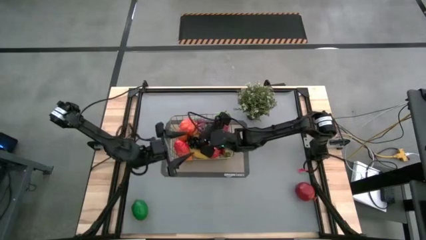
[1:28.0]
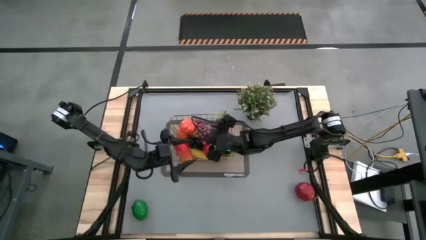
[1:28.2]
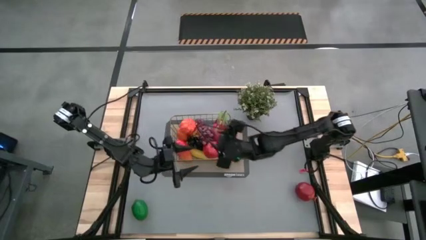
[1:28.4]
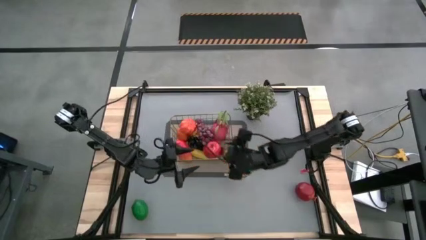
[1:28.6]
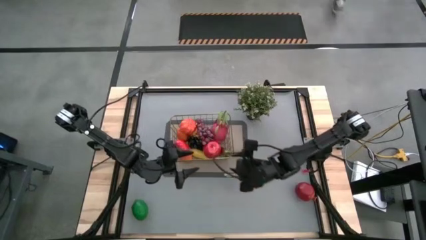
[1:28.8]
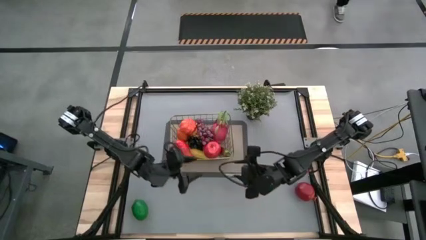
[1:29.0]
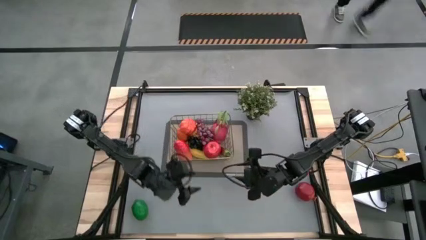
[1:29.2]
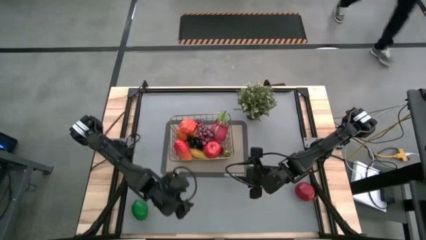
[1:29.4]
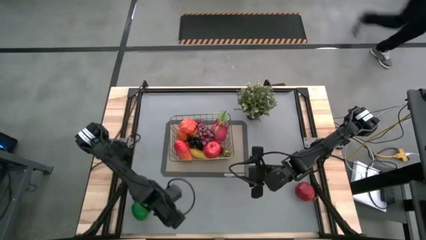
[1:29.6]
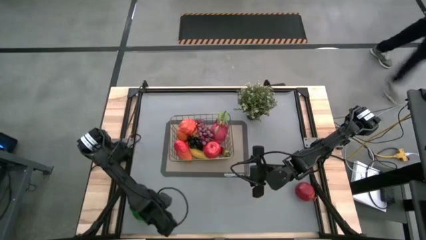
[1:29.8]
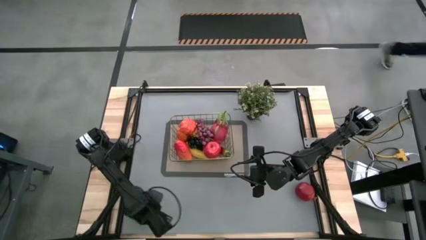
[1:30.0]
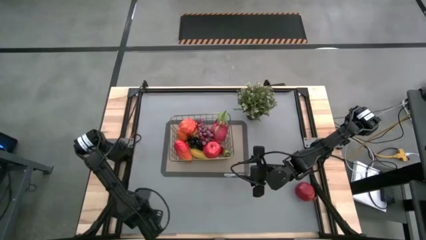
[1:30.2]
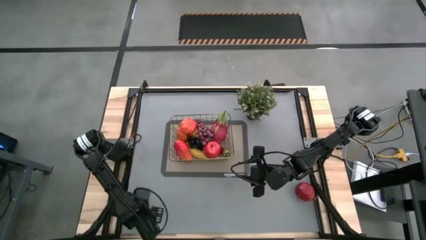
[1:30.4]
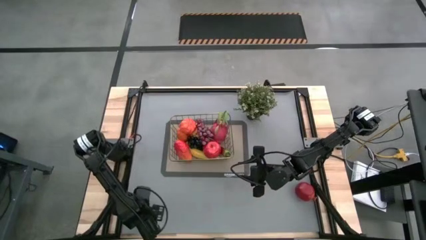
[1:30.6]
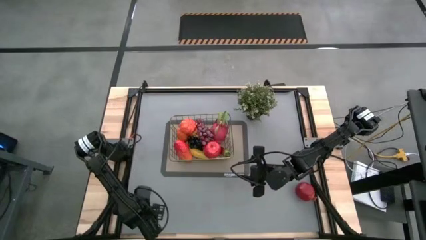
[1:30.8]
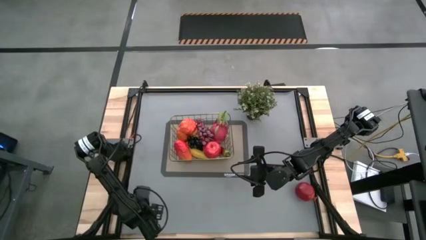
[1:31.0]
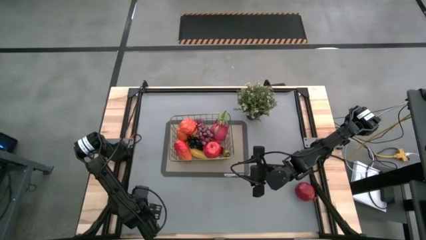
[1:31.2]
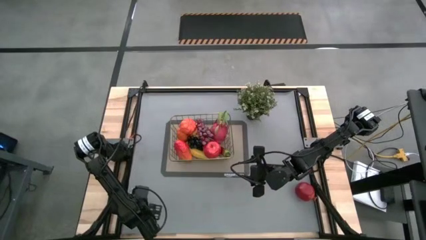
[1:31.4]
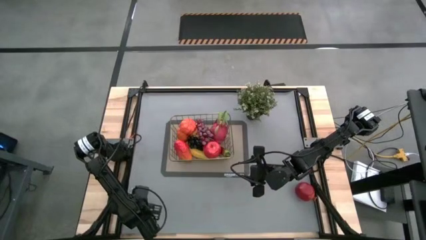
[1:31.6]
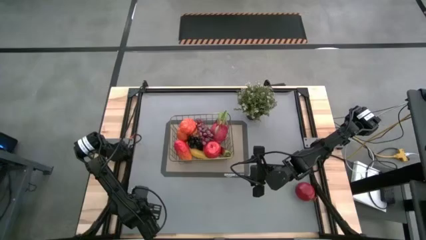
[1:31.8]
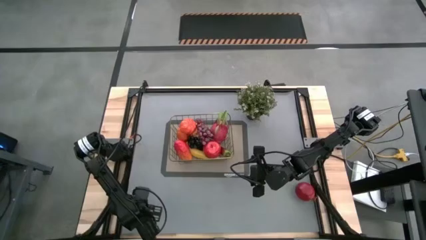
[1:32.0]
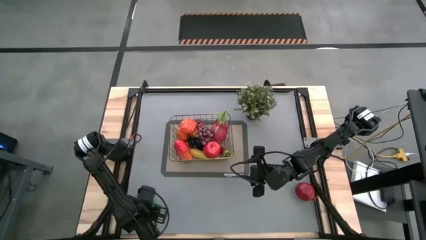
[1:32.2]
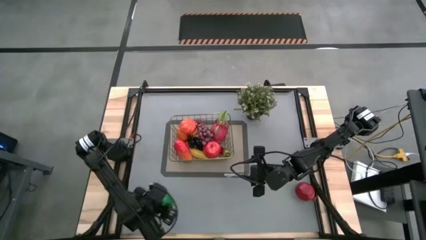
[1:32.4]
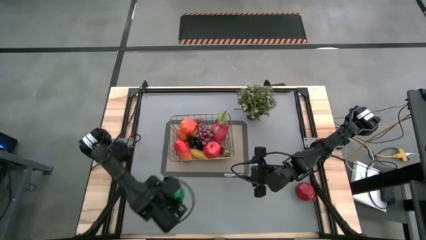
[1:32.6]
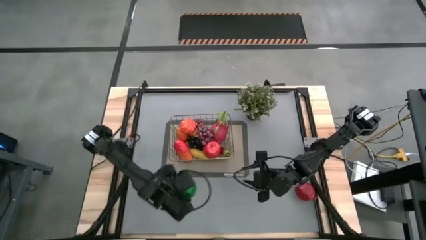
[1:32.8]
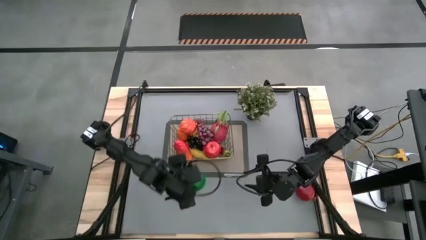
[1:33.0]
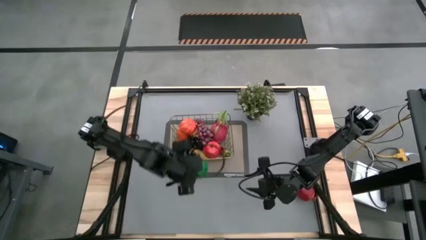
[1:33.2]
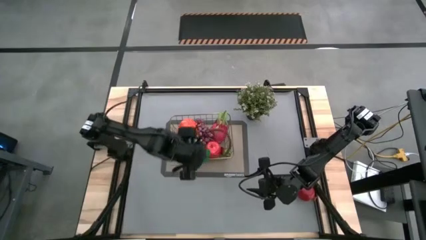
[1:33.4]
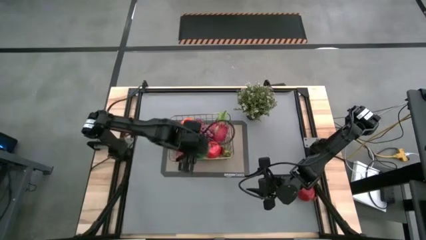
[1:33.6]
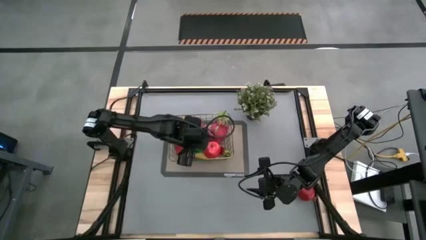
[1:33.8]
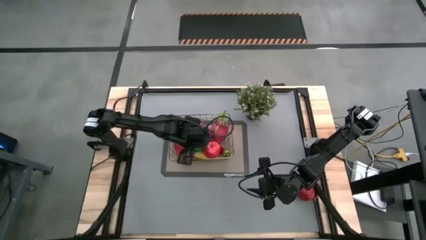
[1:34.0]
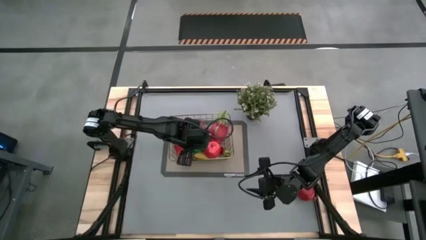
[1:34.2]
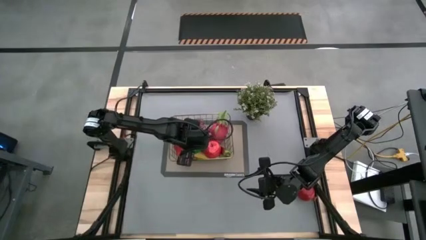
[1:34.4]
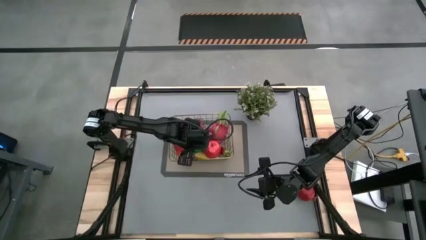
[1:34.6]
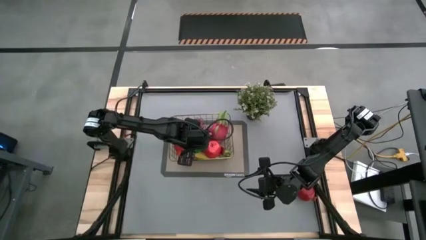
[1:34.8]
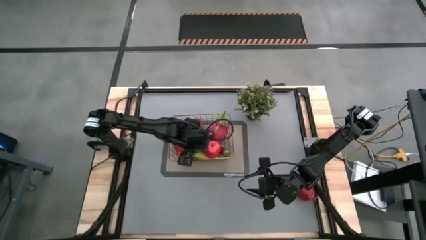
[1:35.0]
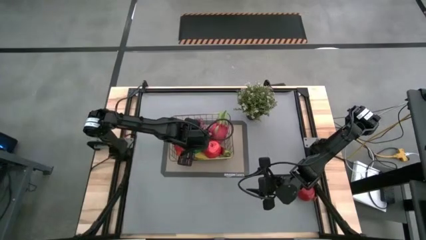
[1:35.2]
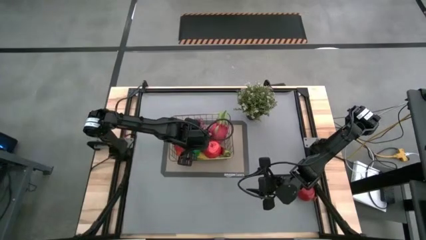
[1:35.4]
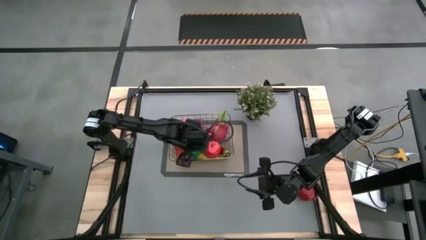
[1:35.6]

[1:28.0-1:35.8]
Task: Build produce basket
Put the lime into the wire basket

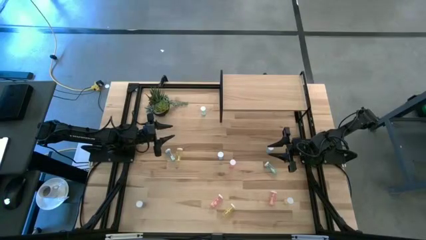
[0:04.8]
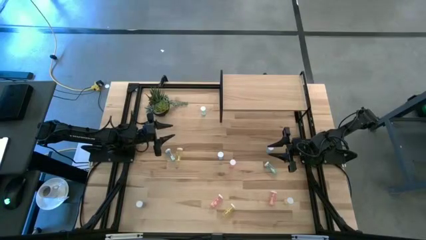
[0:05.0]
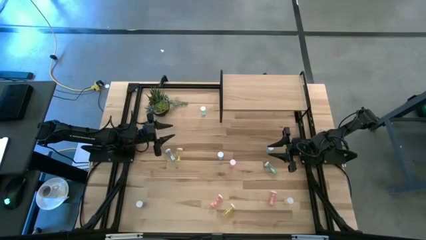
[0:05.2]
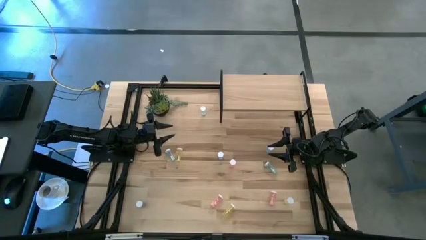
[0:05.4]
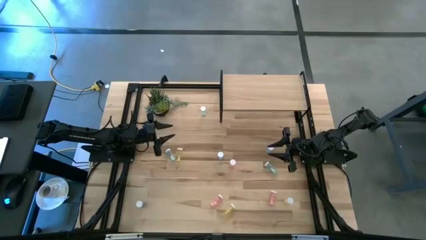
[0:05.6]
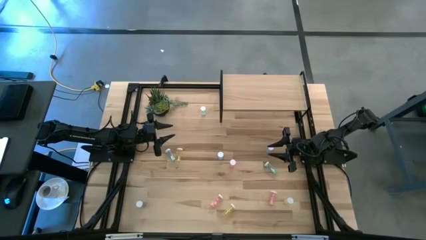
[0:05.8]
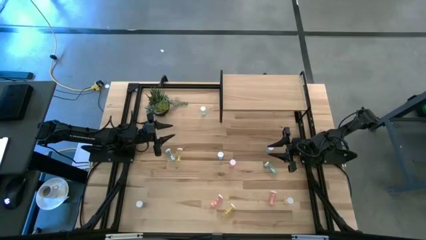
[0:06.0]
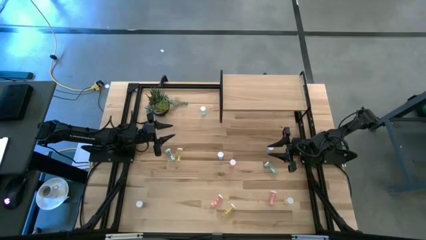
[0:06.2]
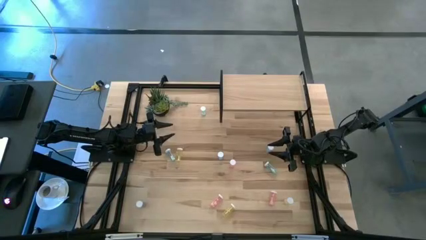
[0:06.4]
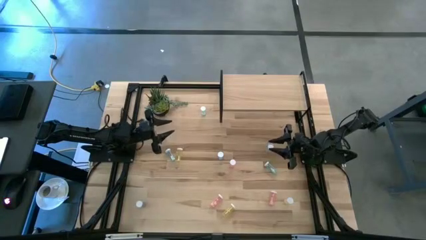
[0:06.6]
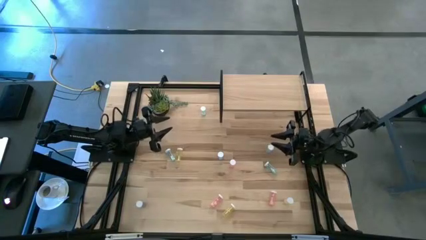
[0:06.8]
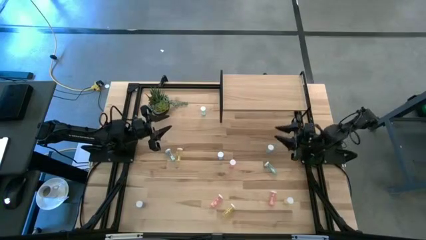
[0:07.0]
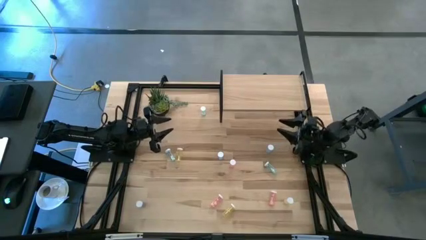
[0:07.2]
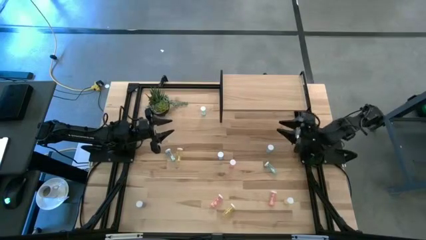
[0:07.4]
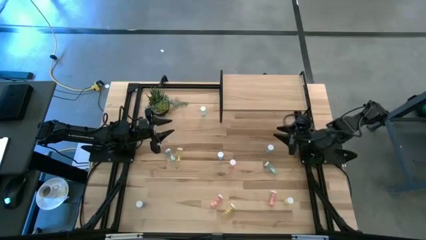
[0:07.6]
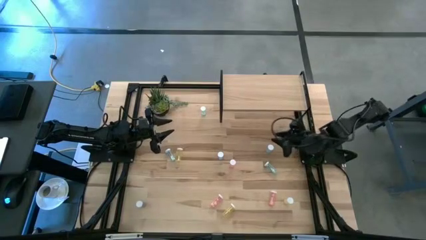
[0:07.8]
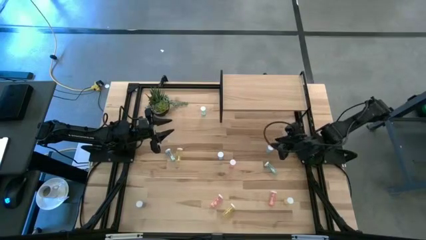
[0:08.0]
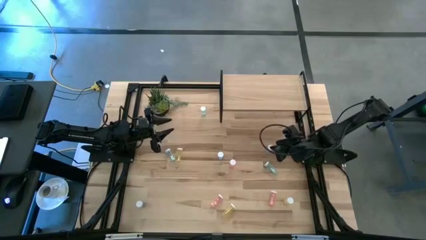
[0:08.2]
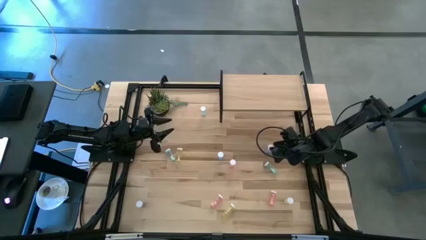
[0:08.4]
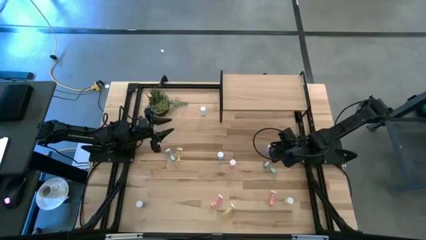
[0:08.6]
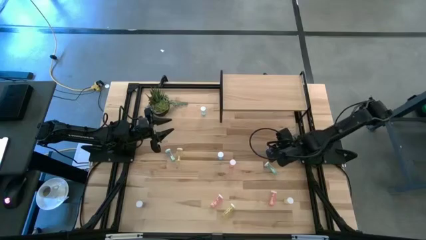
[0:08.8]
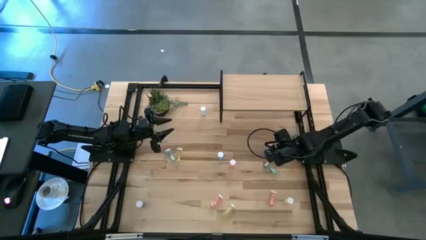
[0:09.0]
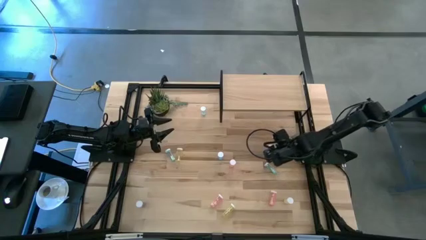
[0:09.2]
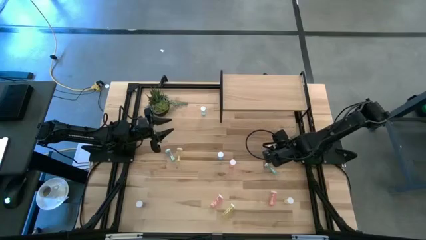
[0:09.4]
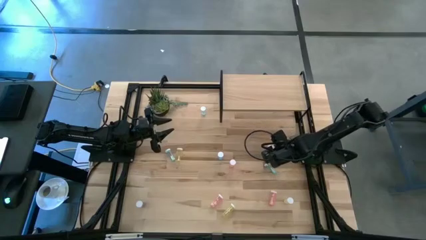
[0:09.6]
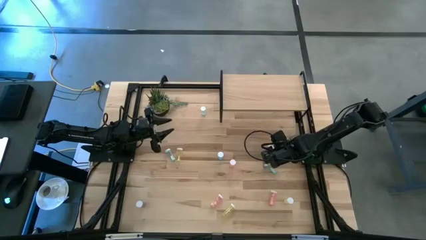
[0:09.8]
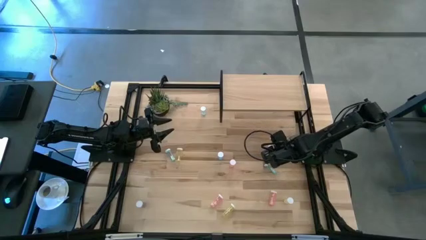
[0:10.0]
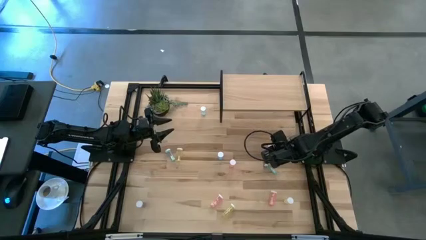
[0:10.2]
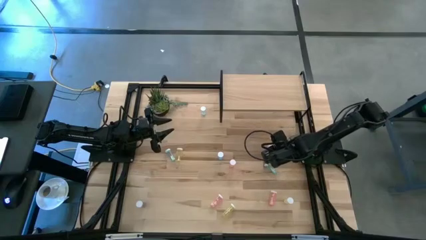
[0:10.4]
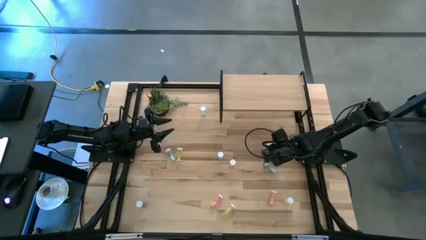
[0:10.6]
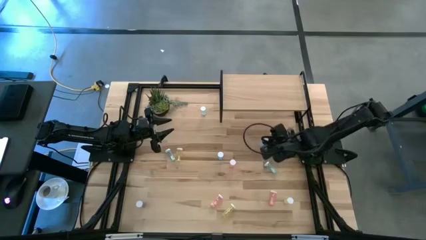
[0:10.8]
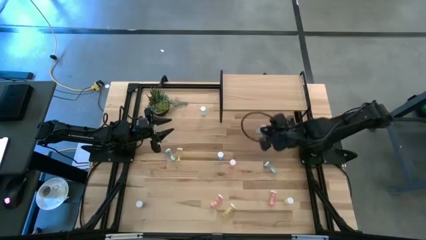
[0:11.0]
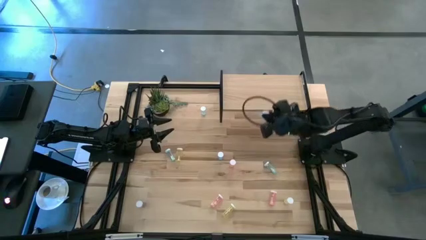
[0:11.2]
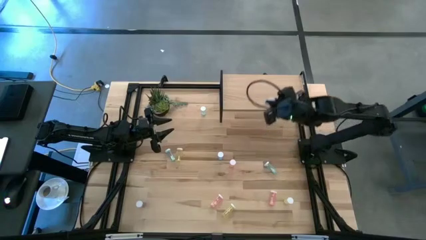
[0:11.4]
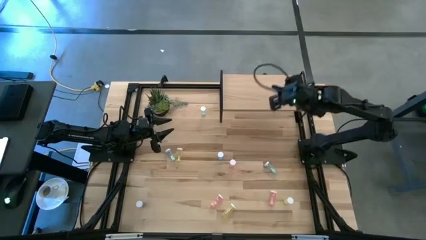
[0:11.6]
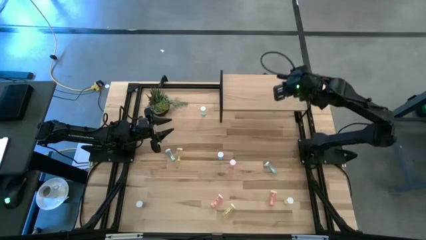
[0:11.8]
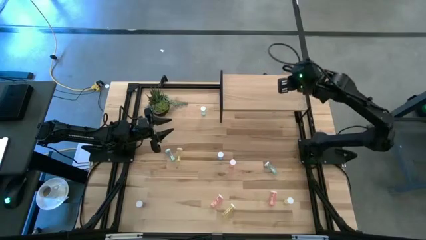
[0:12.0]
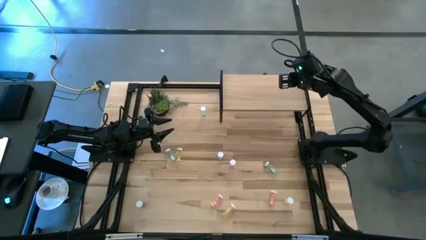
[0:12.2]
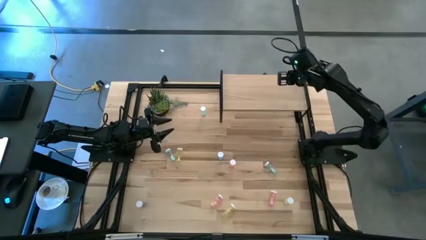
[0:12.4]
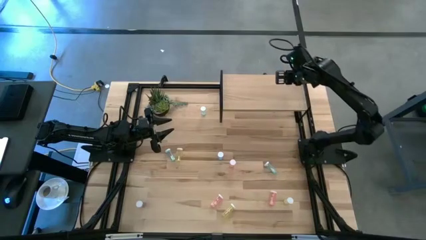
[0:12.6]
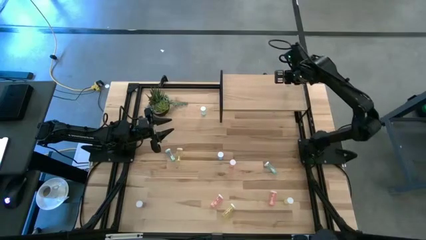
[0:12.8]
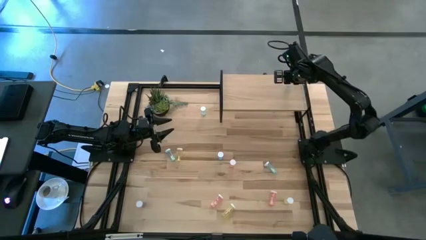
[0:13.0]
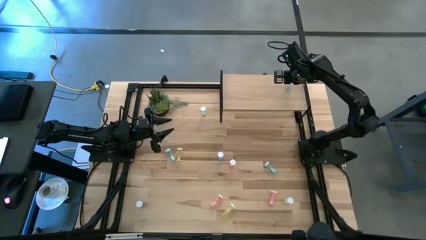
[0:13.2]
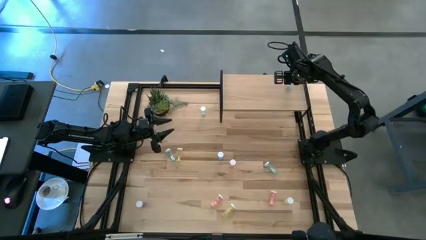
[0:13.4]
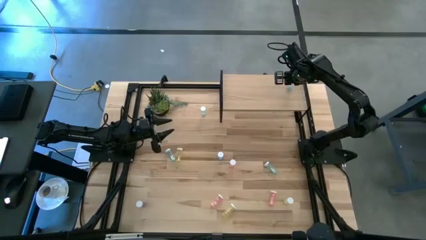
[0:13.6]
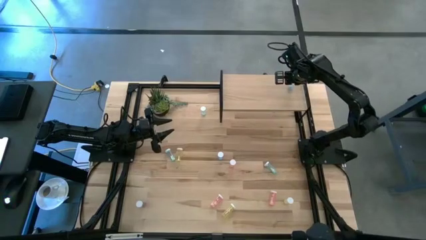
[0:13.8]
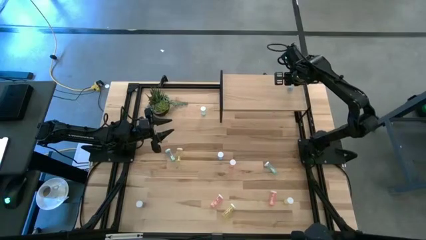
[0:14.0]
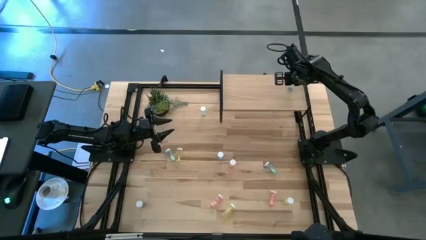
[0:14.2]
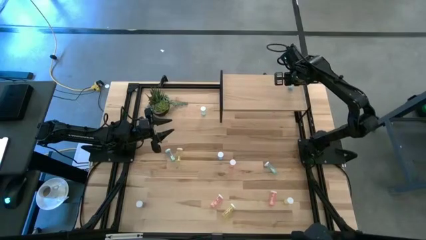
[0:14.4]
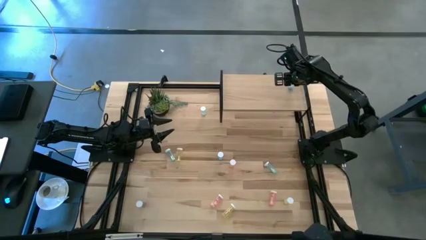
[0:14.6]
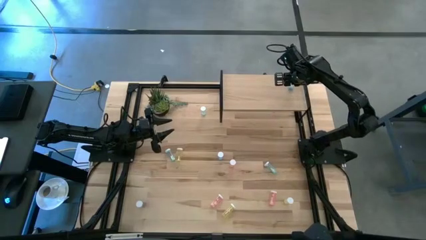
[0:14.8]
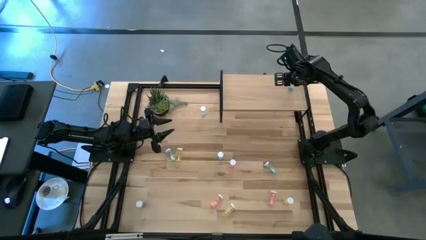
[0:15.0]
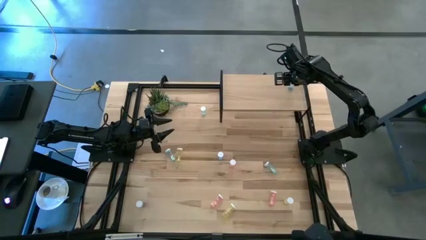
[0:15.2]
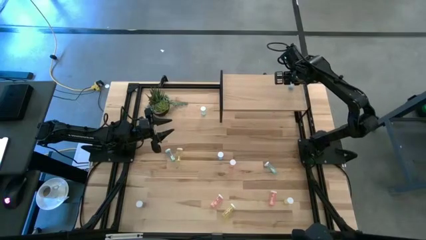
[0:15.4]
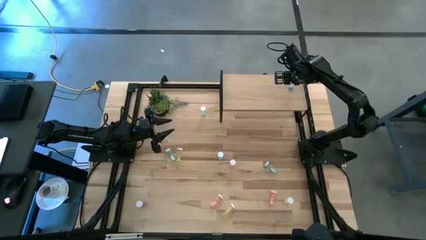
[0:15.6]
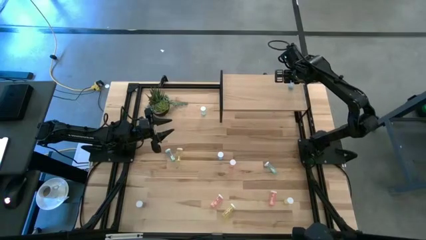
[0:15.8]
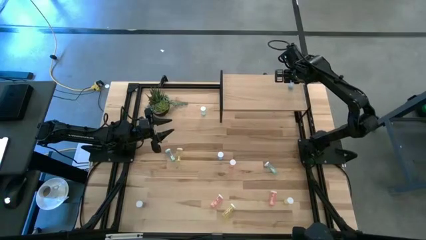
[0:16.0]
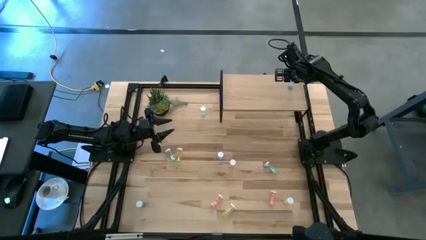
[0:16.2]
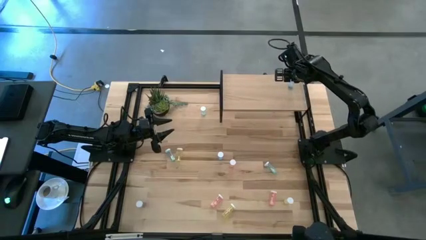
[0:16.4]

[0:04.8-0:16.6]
Task: Pick and place medicine bottles onto shelf by color
Put the blue pill bottle on the shelf
